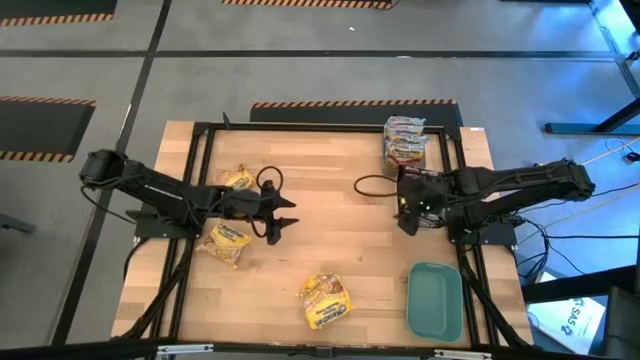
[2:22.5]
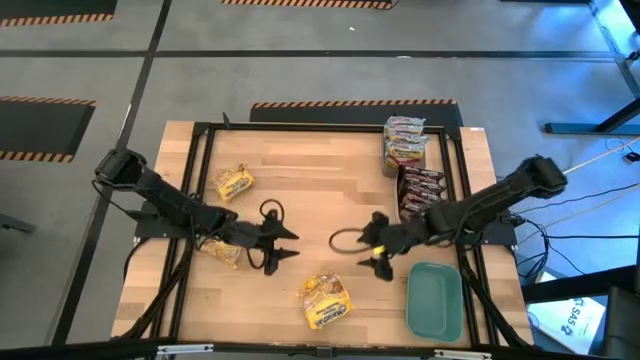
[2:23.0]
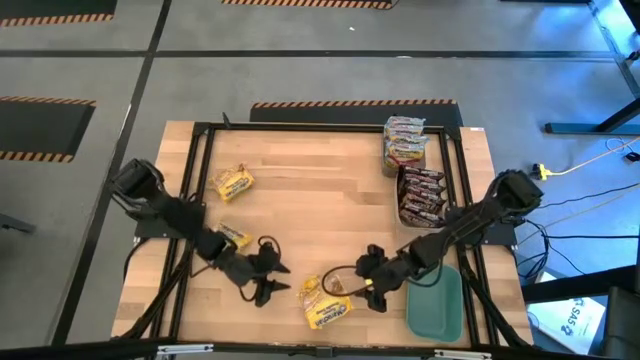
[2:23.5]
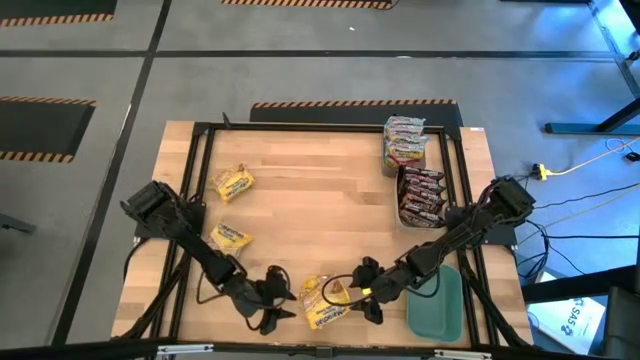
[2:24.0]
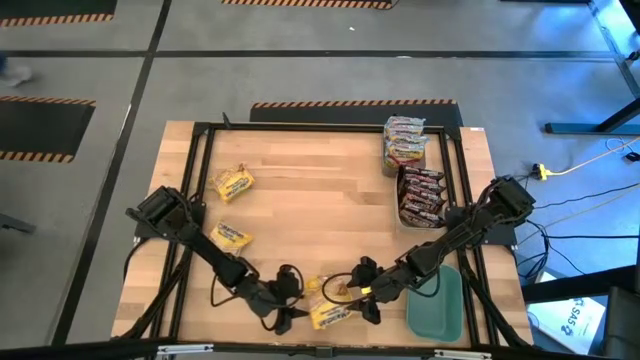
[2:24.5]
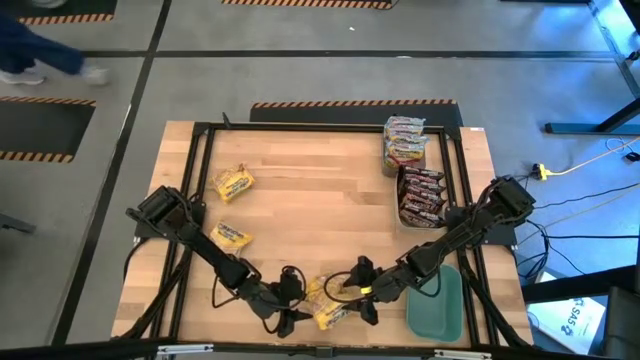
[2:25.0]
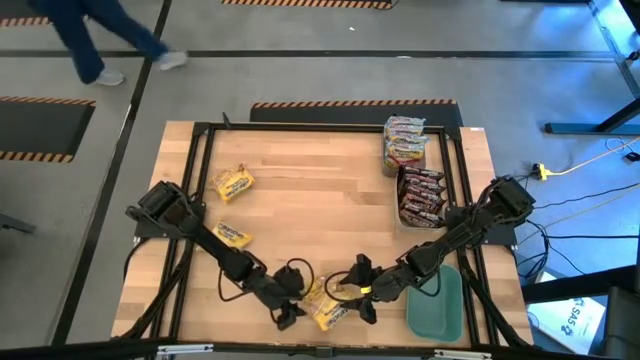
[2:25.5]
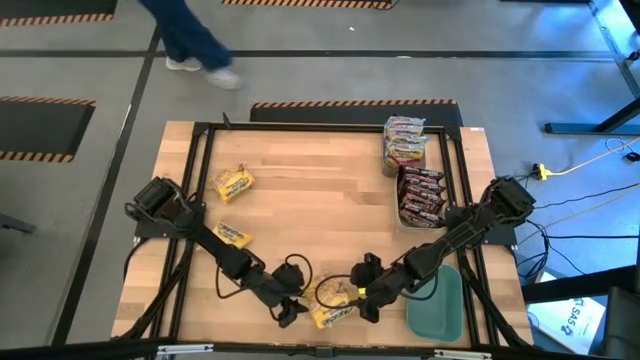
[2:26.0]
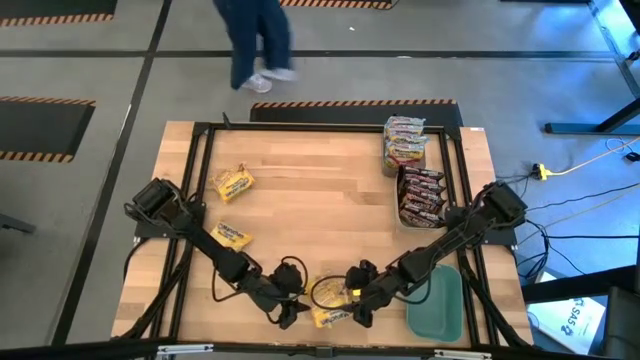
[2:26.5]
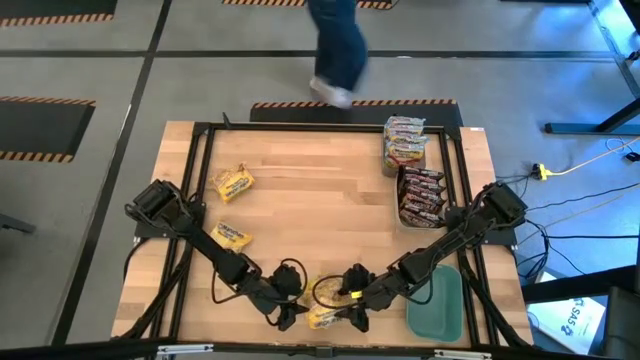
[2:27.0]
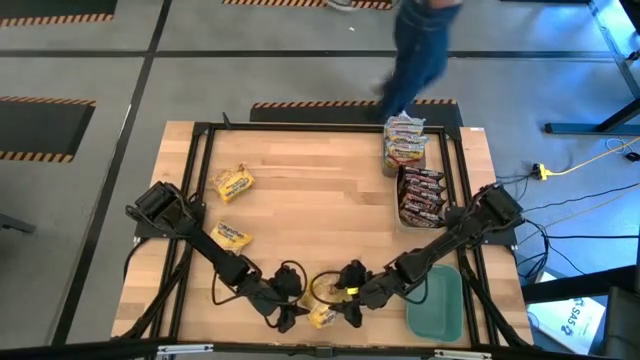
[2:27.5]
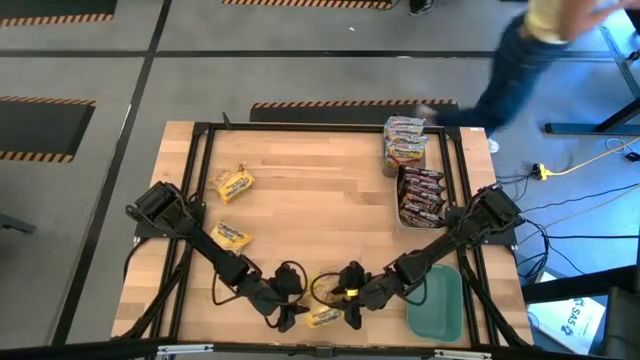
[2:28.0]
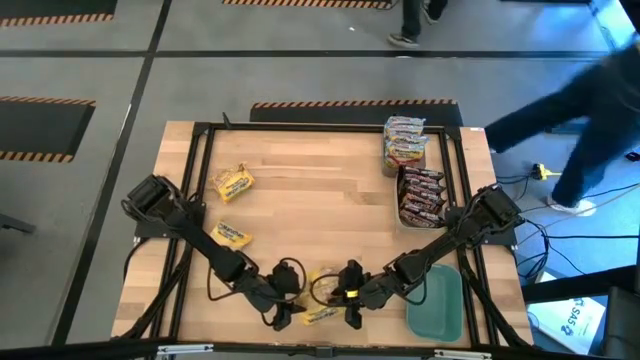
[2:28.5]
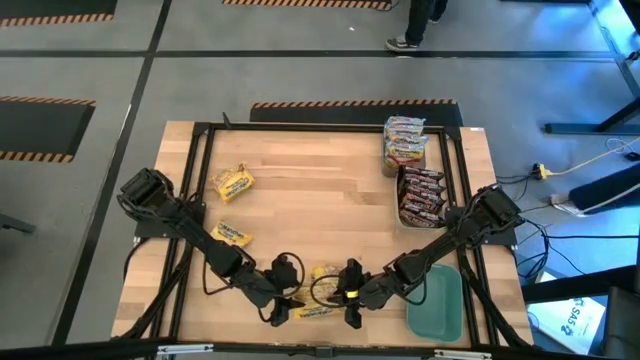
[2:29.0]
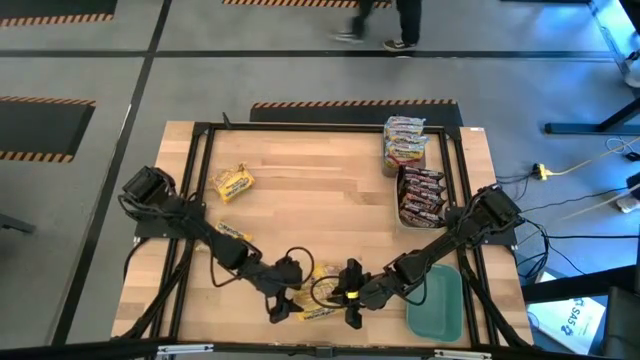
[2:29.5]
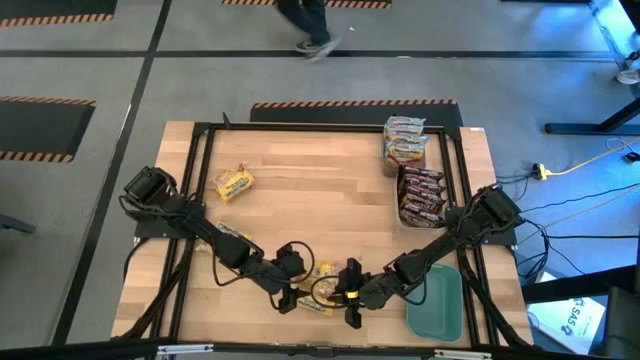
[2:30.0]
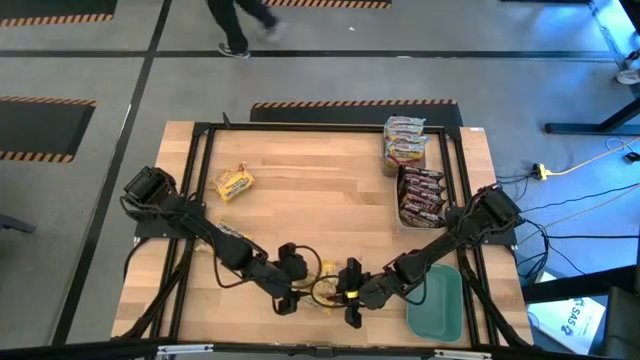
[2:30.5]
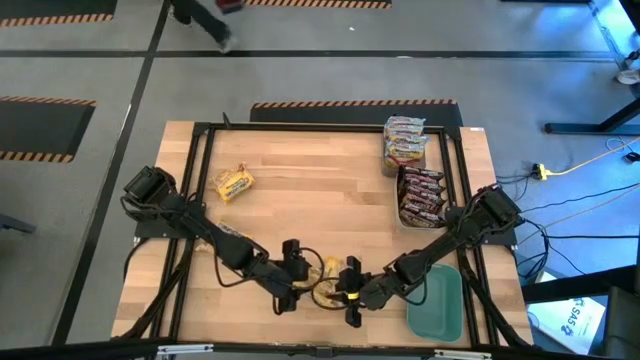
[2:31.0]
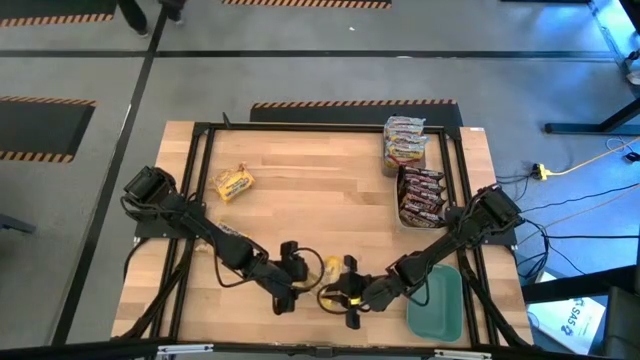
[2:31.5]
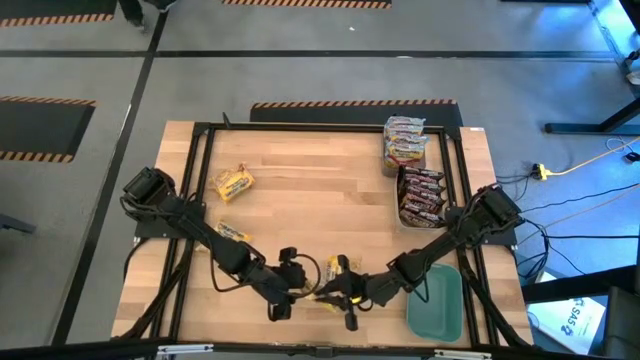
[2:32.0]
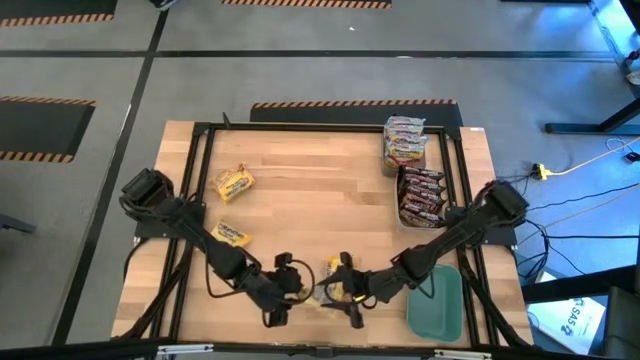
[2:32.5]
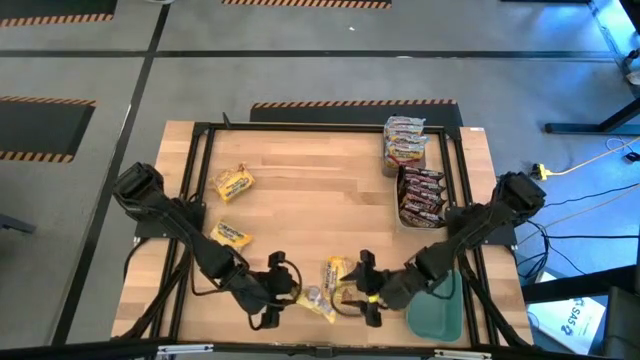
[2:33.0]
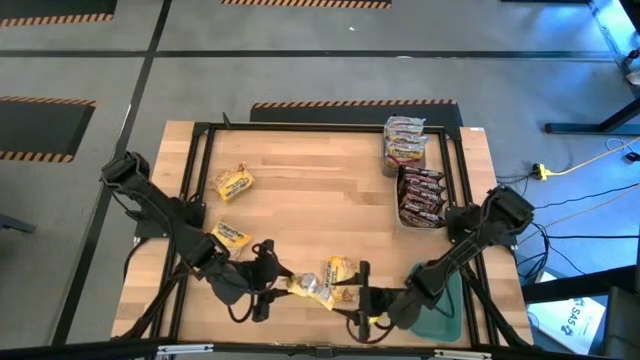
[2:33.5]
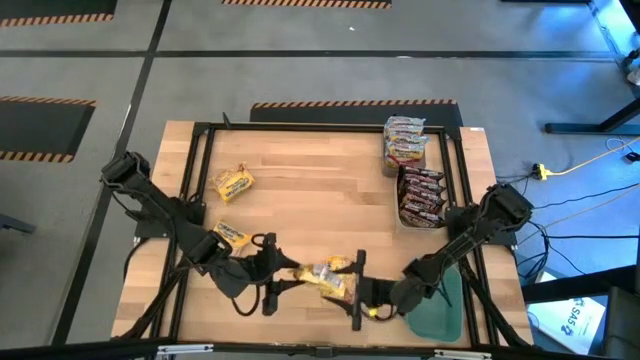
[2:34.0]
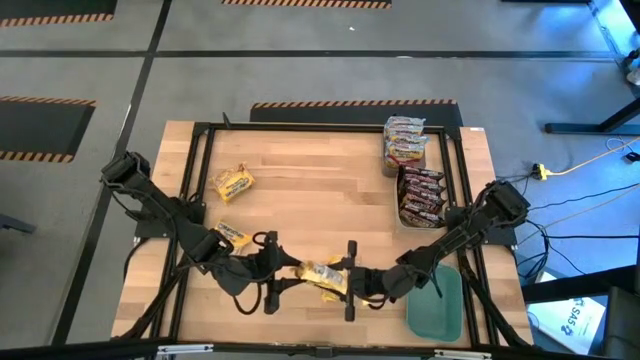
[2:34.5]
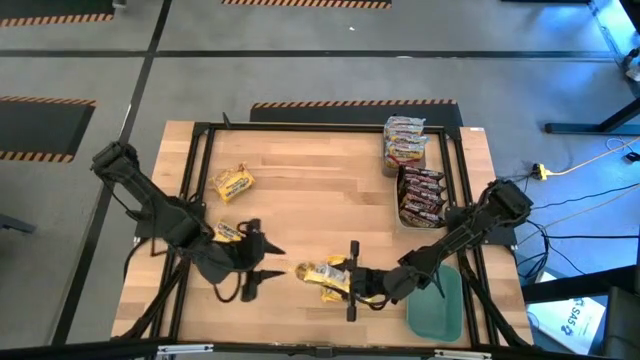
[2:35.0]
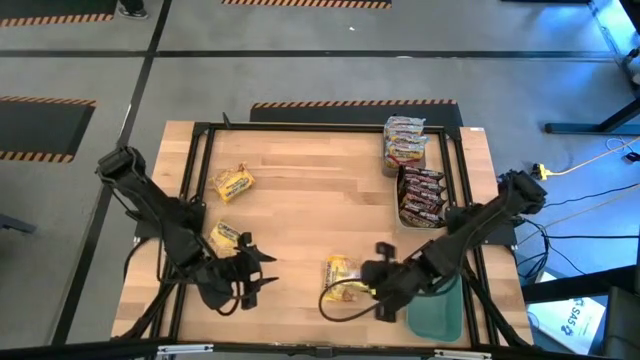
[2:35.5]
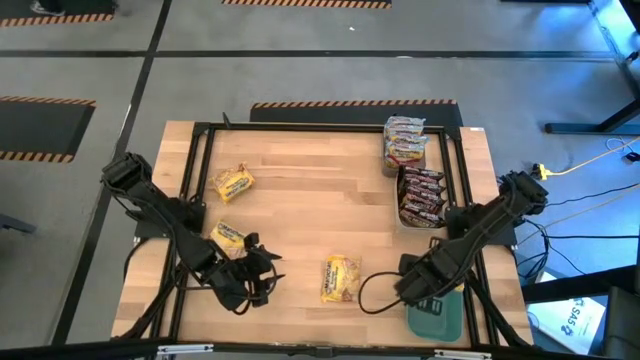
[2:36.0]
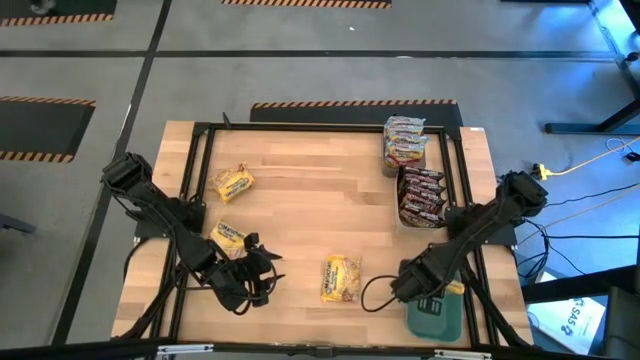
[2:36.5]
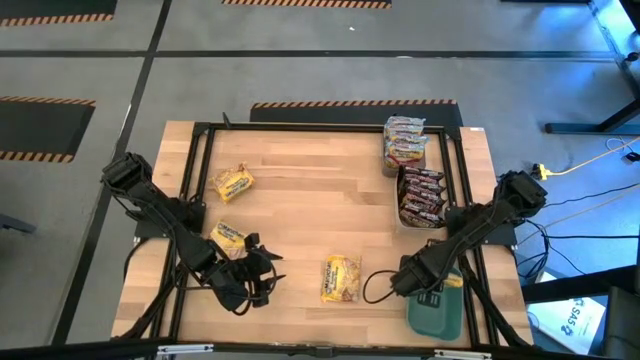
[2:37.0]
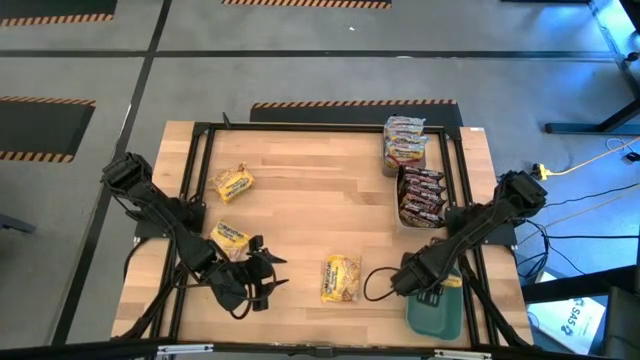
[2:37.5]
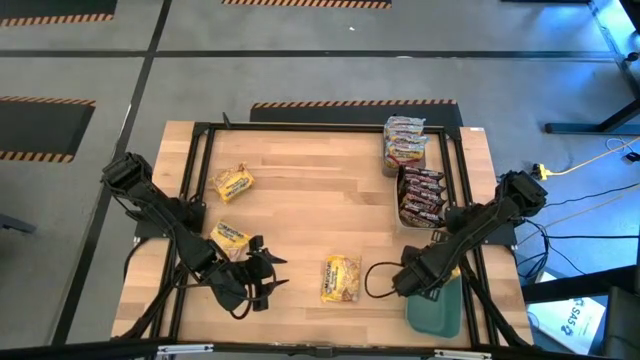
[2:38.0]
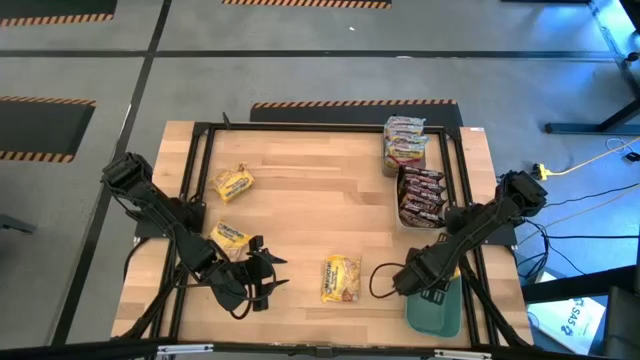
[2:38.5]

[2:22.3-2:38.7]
Task: Sort Maruchan noodles
Put the yellow noodle pack into the green bin

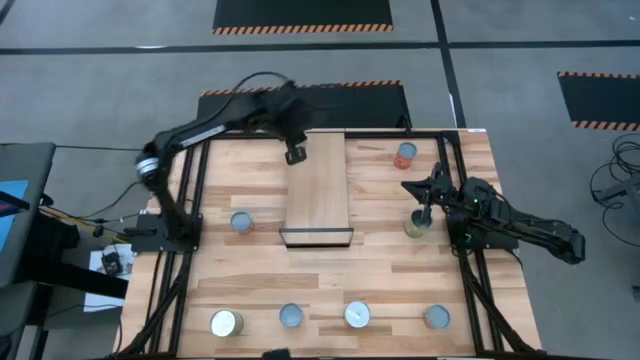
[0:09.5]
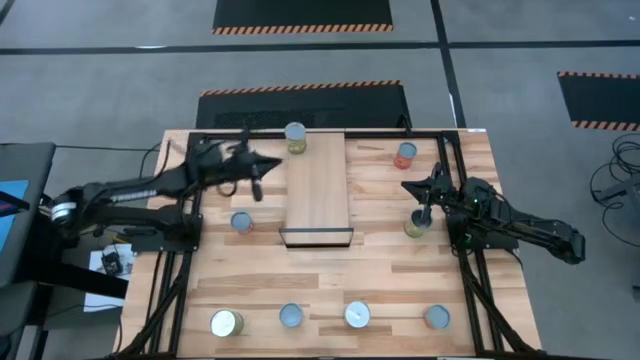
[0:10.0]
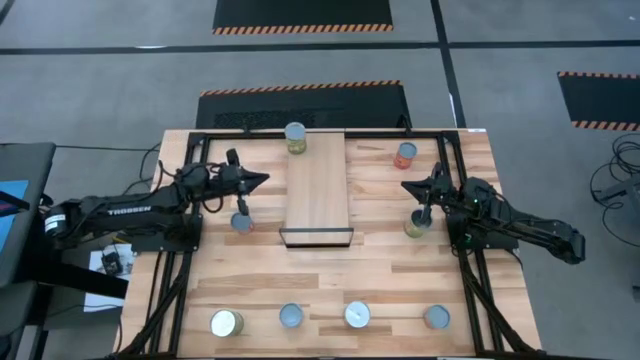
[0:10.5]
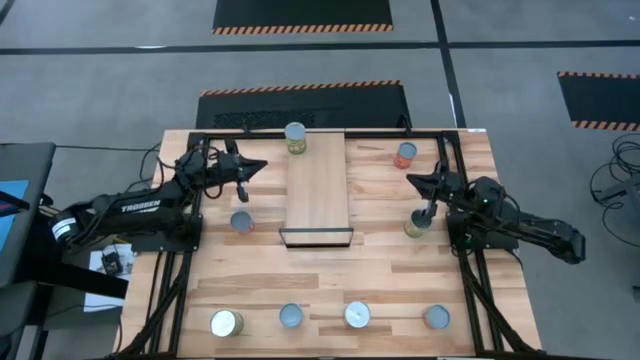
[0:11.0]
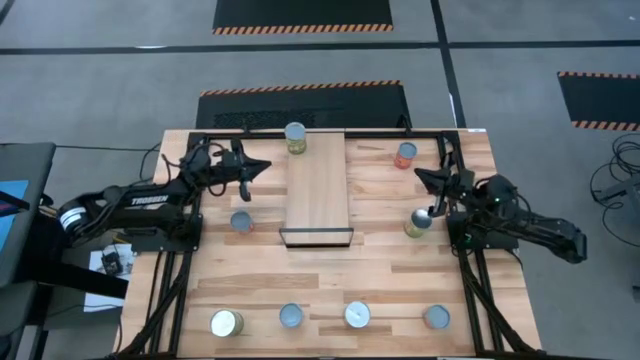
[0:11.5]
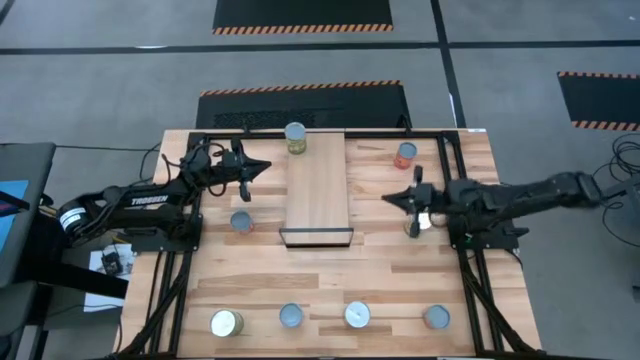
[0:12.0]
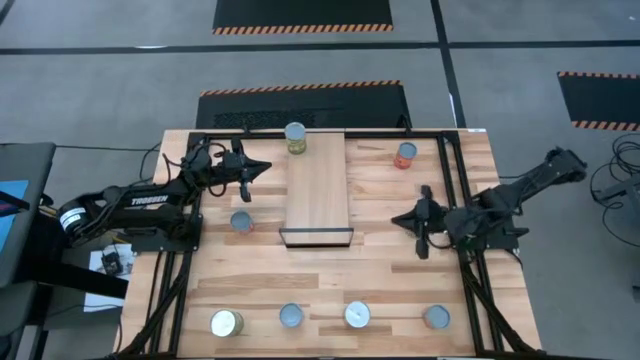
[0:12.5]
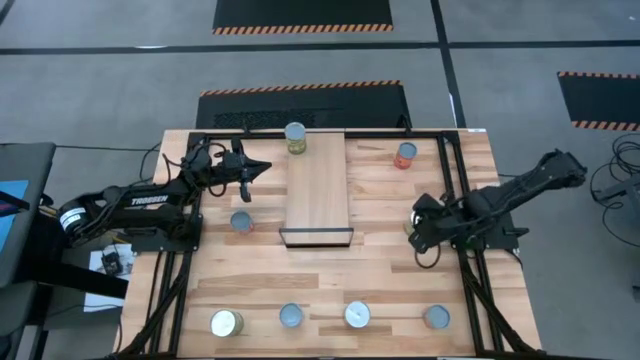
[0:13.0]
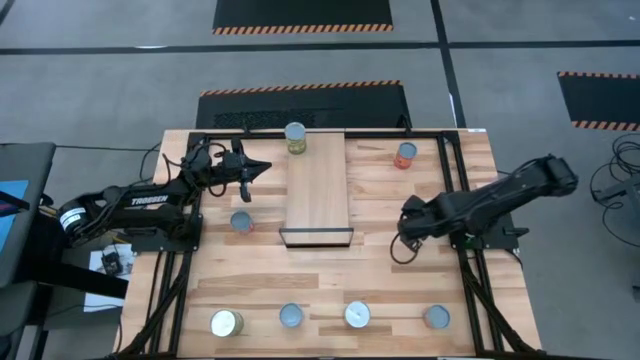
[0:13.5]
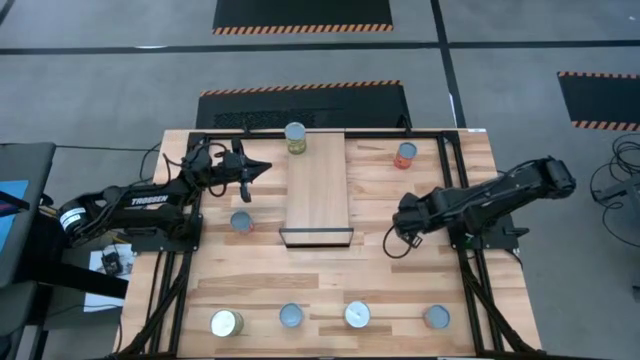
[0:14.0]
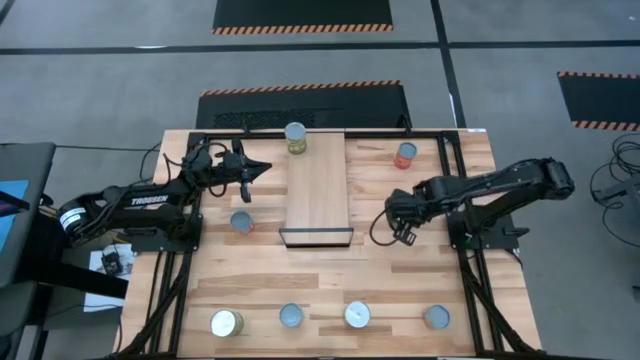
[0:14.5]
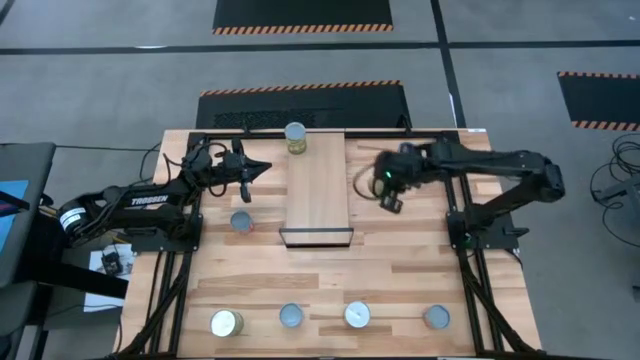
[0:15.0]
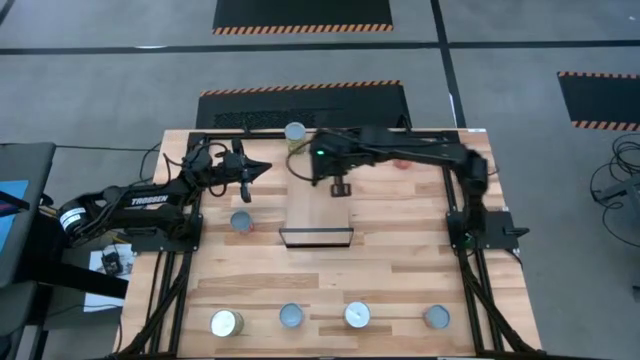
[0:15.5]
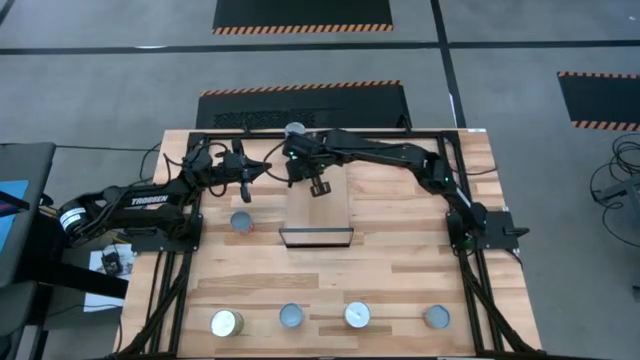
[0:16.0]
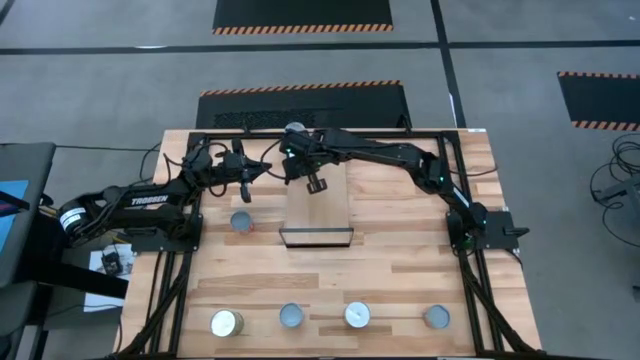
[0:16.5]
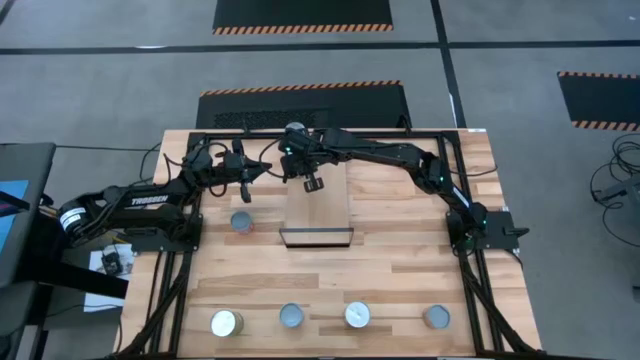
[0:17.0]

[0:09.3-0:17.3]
Task: Pick and place cans onto a shelf
Put the top canned oranges on the shelf
